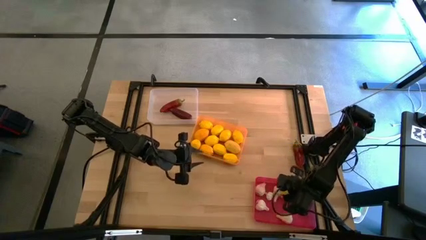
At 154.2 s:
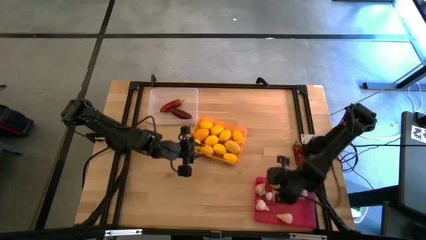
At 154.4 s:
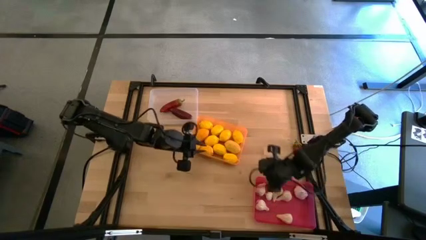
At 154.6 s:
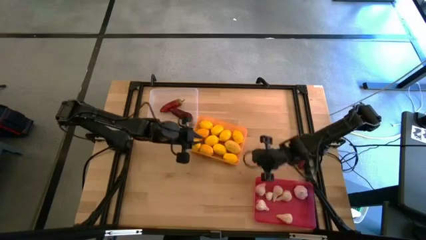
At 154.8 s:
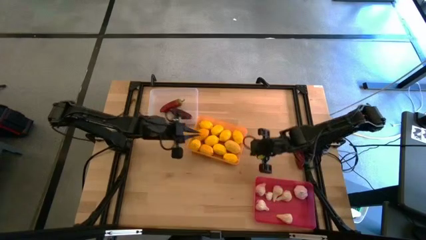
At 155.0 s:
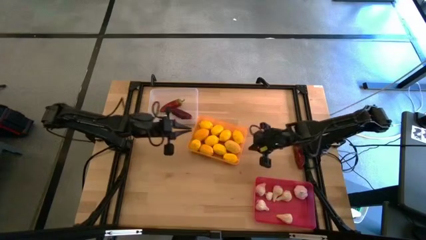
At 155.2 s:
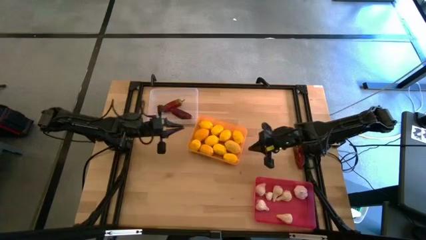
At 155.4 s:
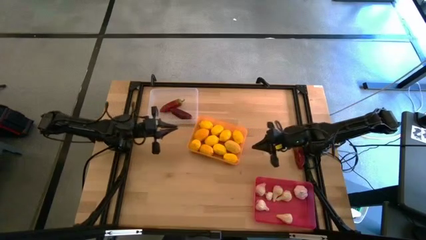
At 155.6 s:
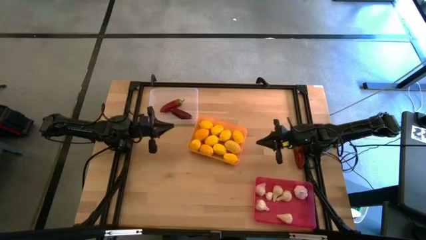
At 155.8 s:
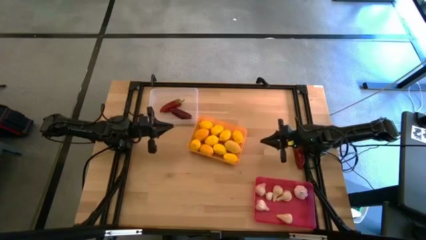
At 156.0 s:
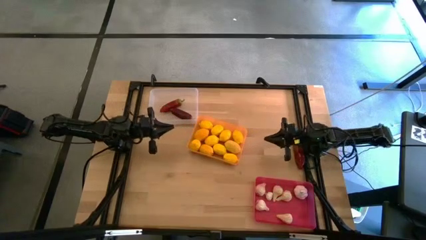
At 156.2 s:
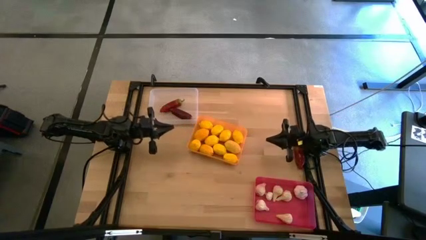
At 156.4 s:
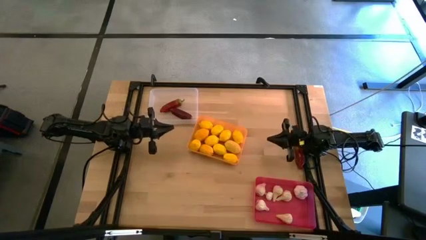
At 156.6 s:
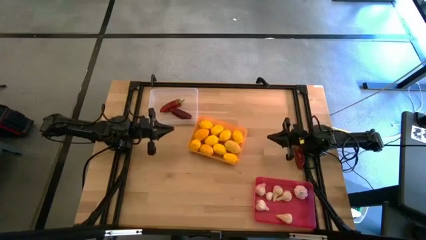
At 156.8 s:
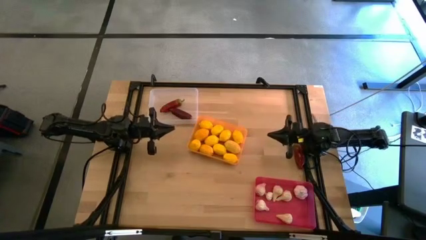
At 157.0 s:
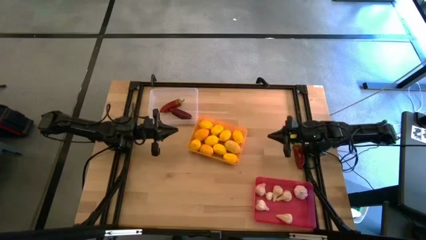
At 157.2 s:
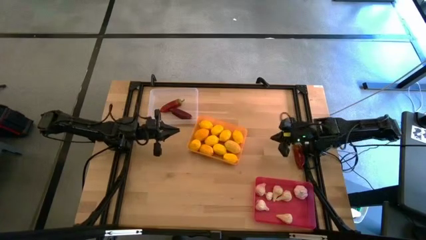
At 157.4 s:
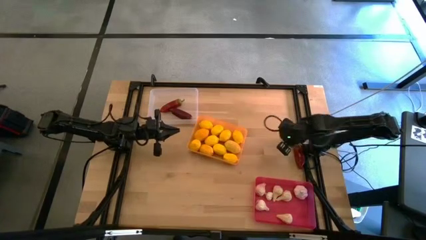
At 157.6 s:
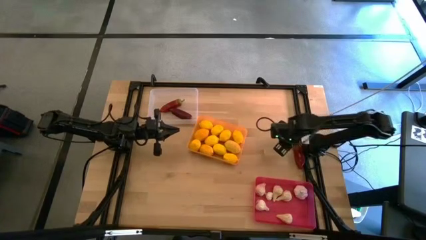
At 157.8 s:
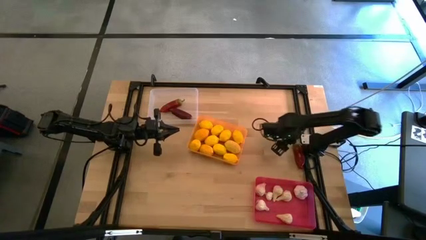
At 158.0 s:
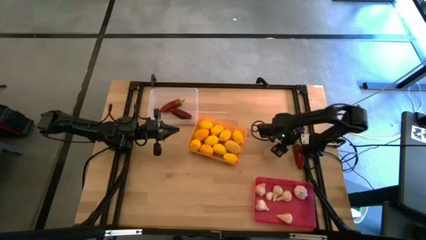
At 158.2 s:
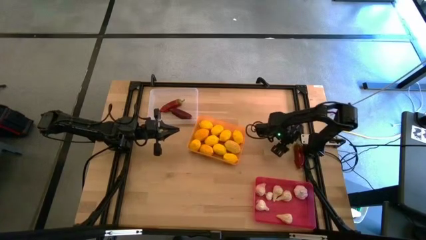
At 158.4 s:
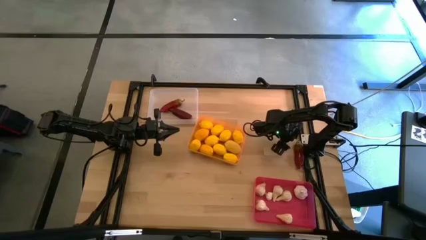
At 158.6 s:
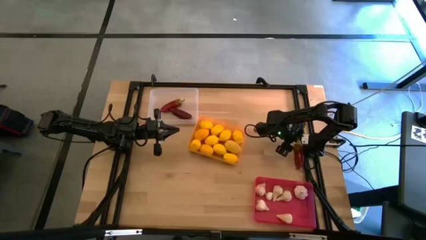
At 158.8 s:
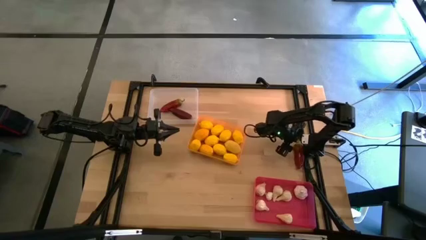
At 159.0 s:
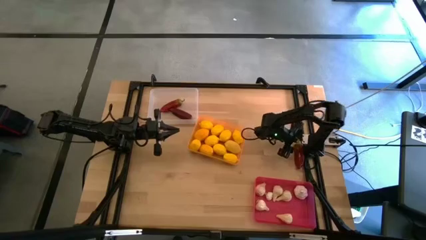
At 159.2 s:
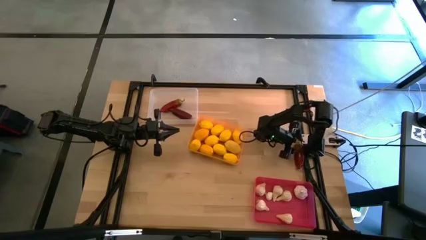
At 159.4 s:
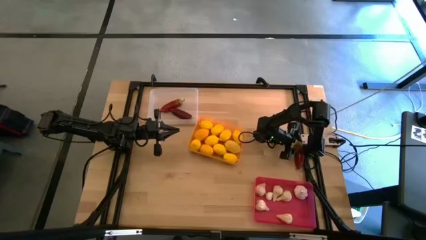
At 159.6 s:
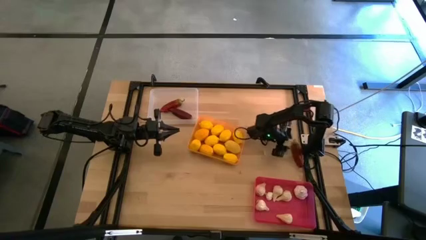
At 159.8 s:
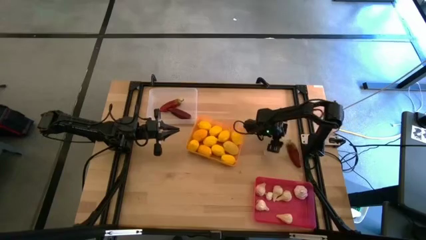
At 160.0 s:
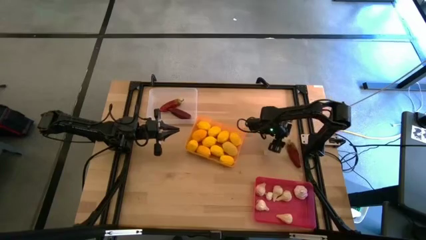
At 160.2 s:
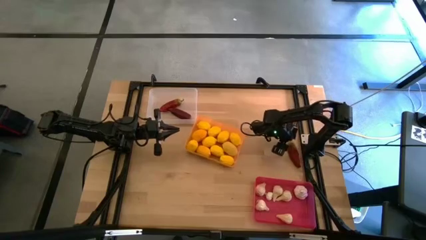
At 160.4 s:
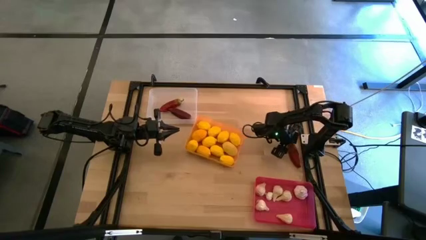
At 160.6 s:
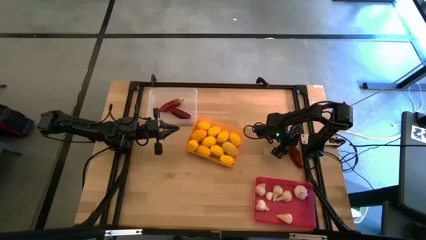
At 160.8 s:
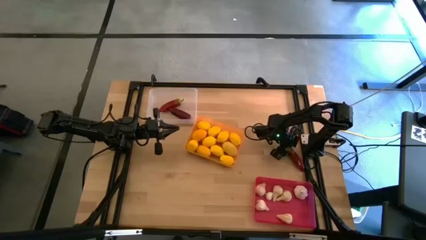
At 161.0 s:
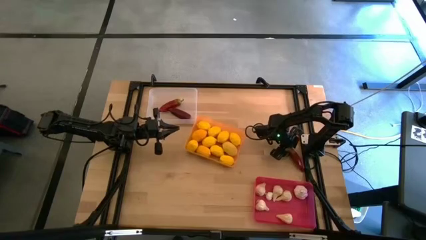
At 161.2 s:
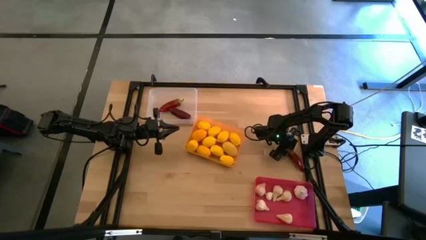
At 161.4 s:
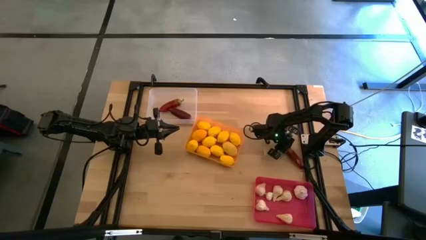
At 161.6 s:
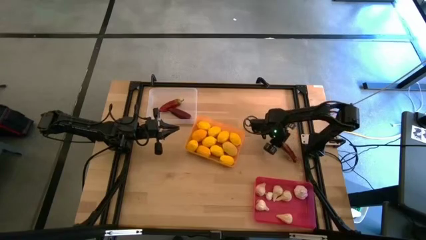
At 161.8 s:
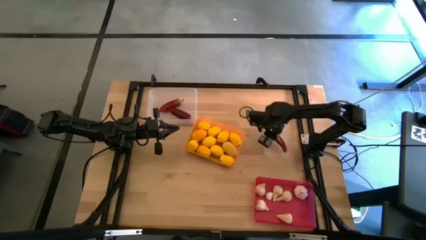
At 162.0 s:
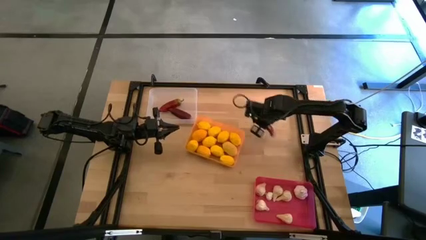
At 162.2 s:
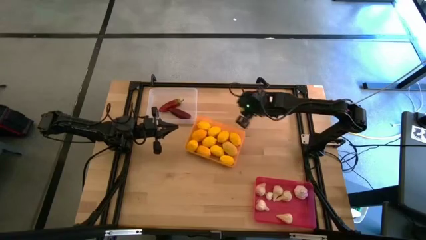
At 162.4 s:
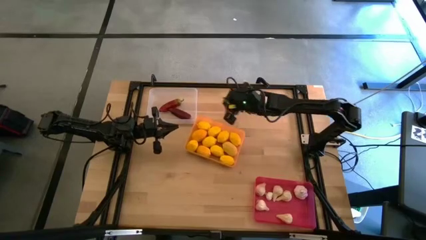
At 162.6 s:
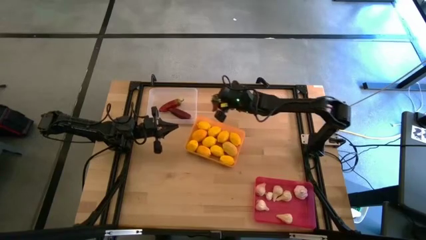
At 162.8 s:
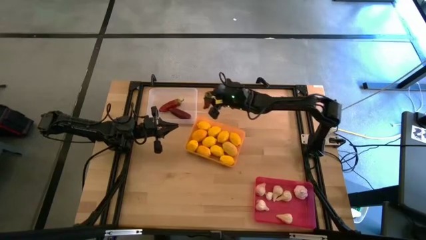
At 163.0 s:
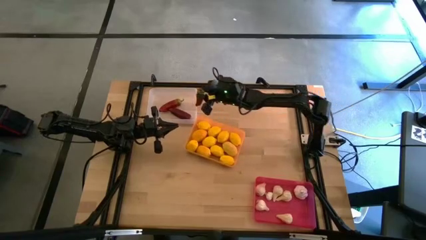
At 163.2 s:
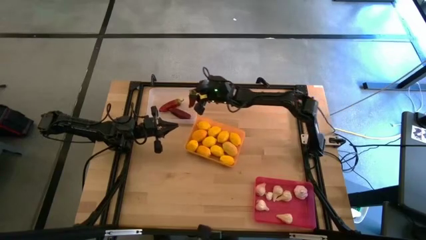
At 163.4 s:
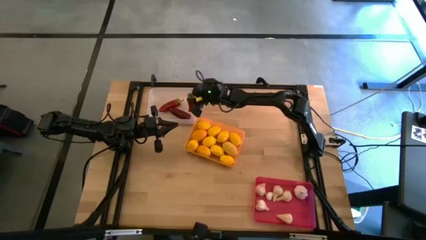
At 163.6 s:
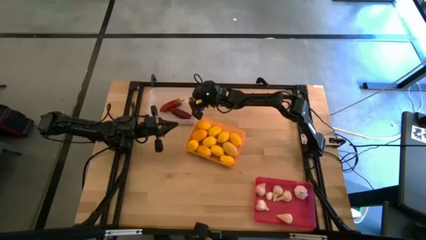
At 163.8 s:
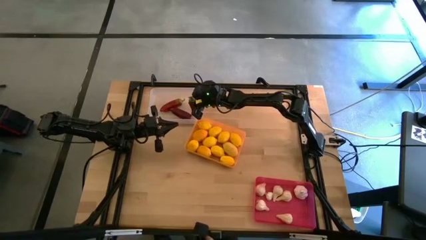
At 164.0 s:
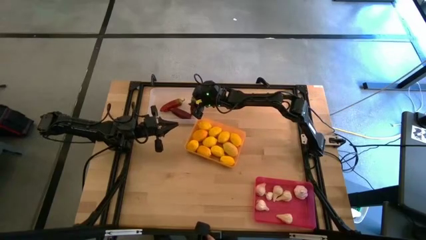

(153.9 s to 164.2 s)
Task: Sort produce into baskets
Put the red chili pepper into the white bin

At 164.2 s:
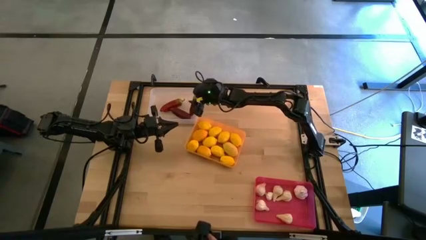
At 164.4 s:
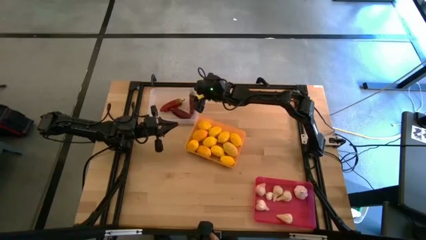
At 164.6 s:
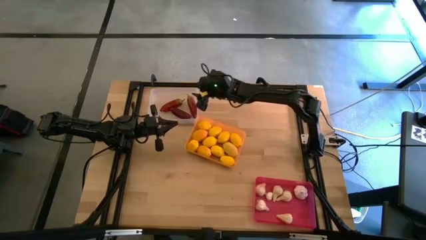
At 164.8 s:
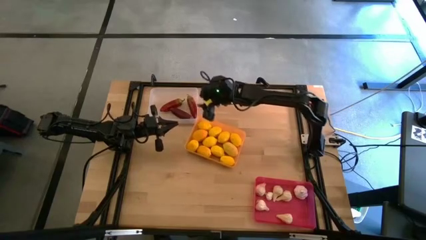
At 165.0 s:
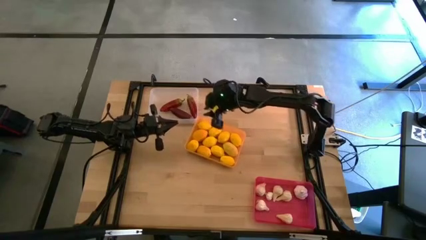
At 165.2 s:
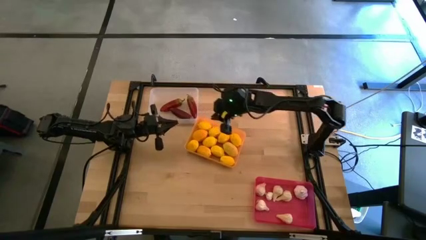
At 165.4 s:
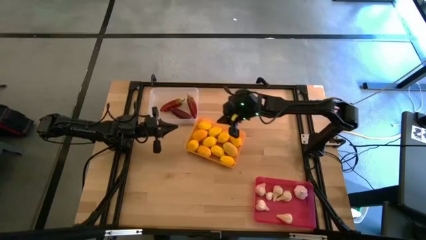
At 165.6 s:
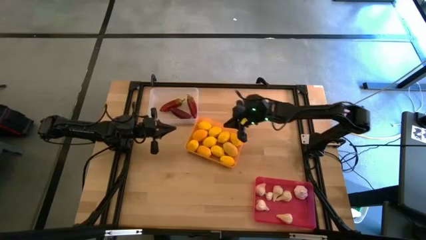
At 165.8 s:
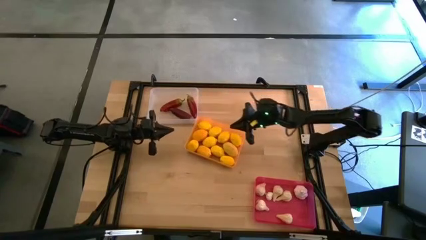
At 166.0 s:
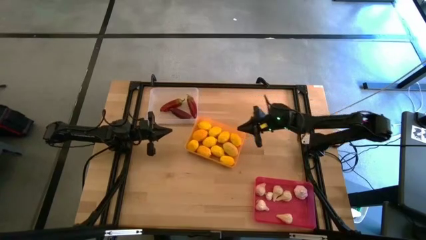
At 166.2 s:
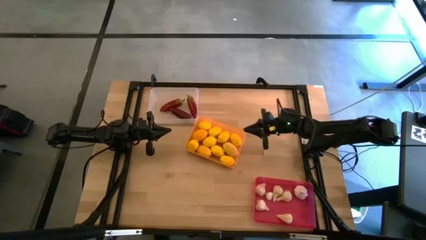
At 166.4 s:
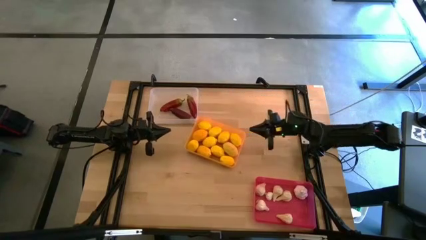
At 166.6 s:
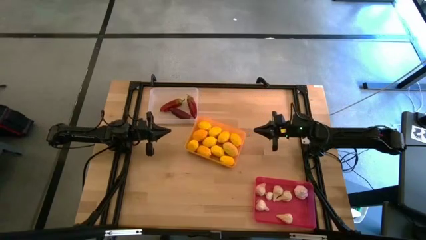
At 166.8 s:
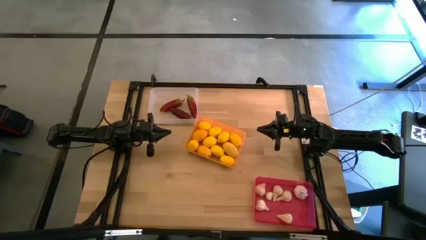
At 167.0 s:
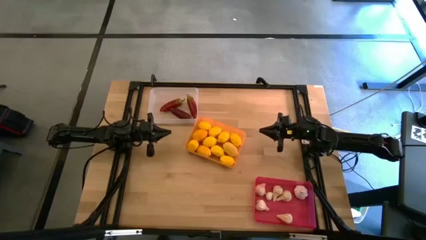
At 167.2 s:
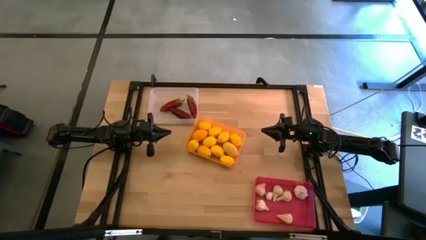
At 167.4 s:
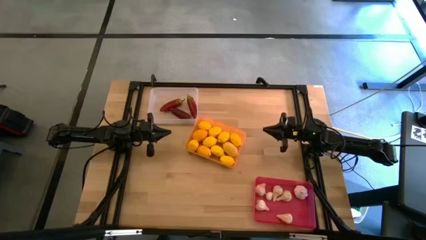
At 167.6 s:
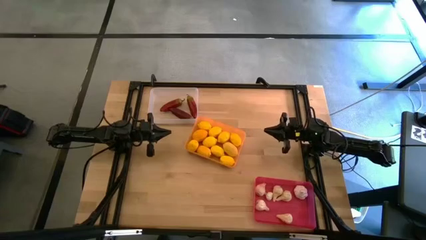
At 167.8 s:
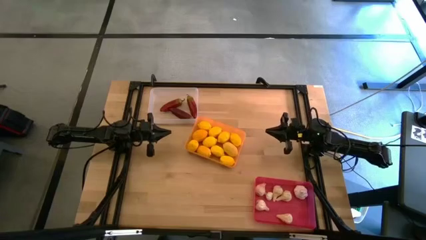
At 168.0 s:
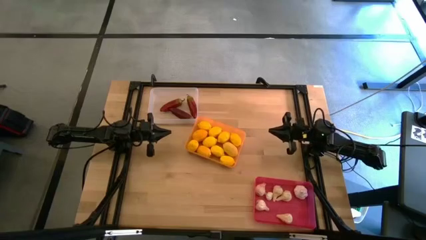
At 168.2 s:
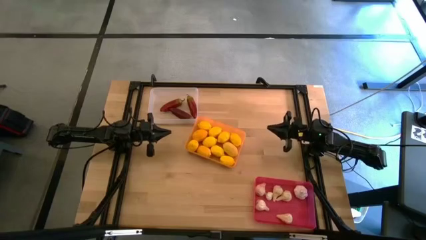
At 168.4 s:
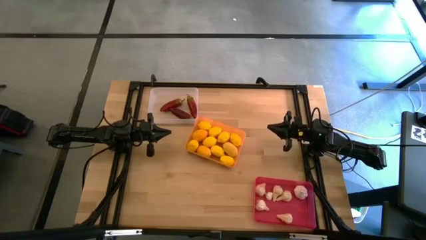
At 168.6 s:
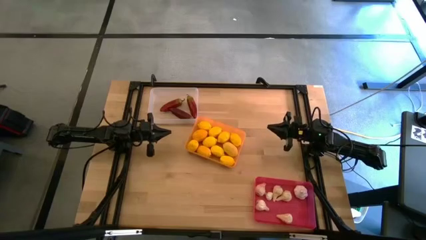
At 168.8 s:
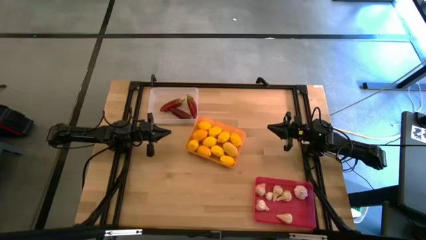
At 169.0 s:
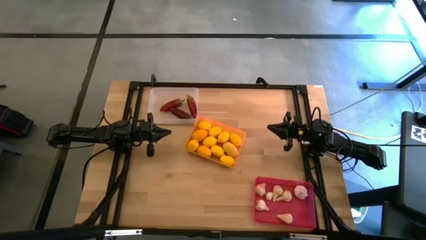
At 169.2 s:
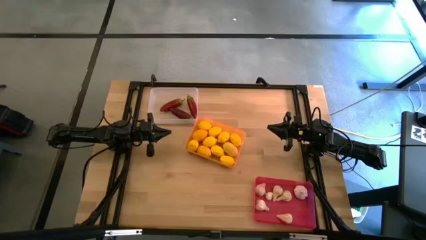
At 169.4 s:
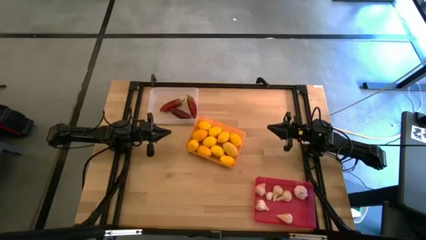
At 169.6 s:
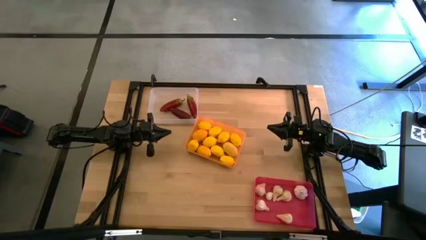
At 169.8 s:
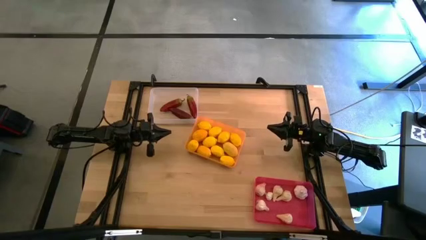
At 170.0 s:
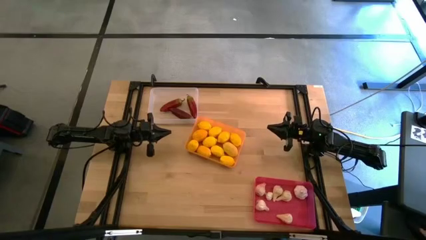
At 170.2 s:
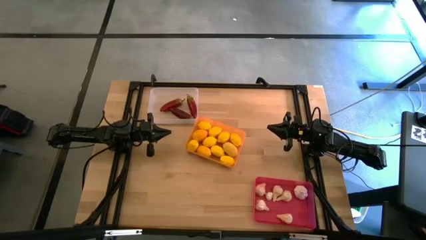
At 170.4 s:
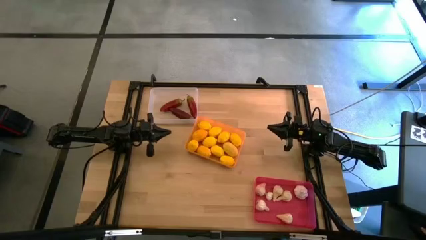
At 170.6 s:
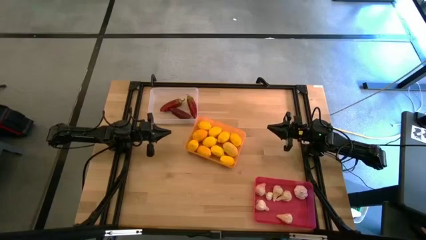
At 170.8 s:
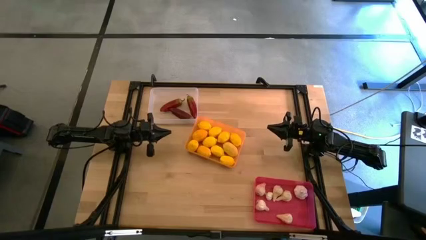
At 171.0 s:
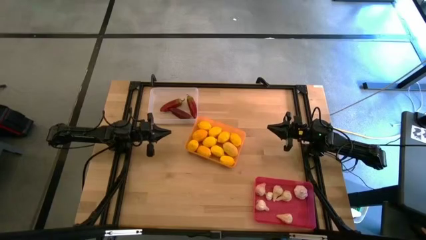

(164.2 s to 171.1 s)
Return to Home Position
